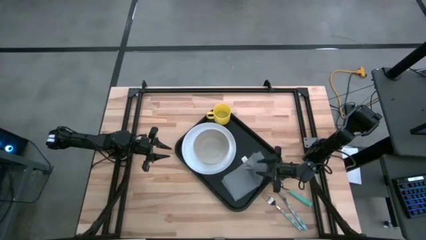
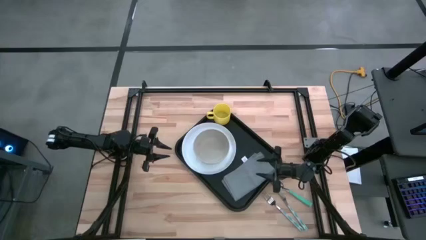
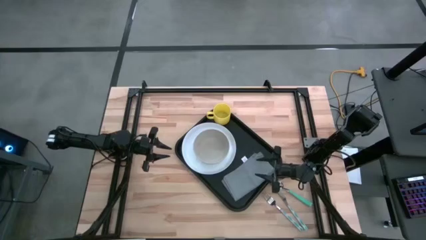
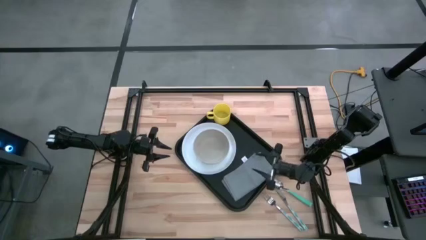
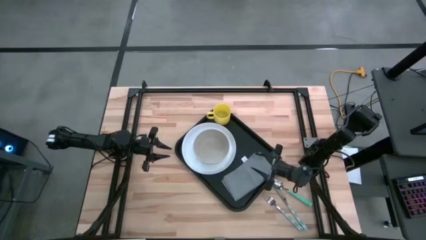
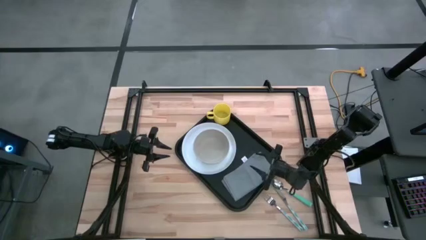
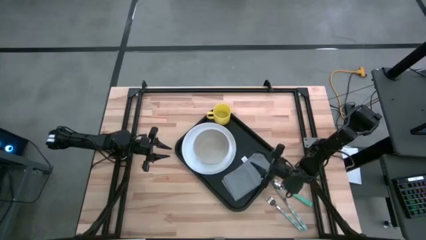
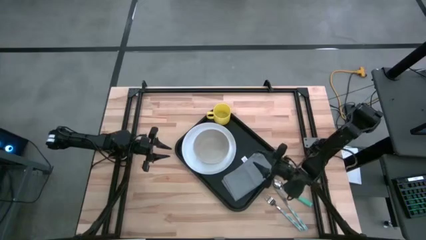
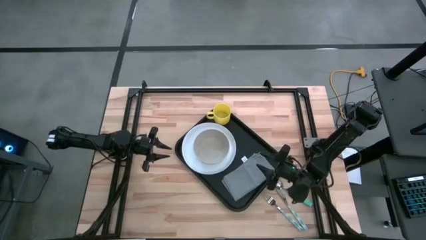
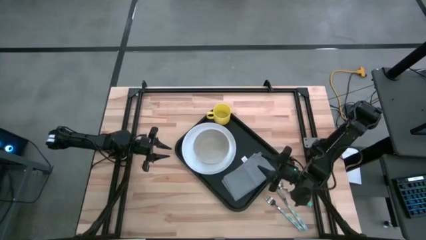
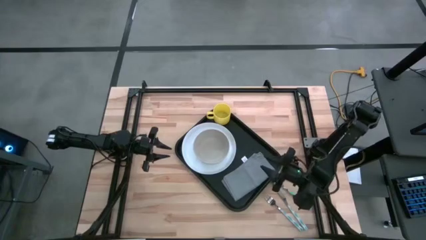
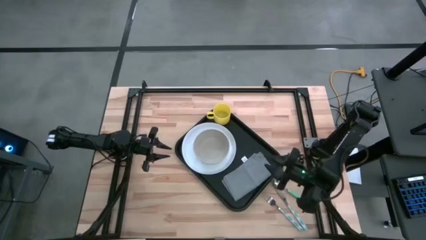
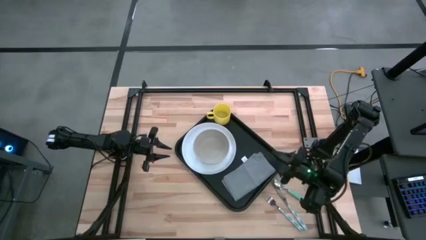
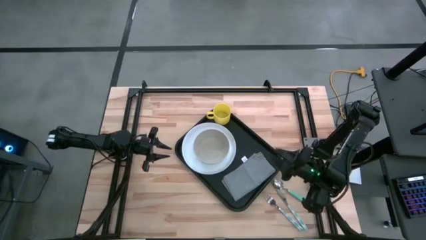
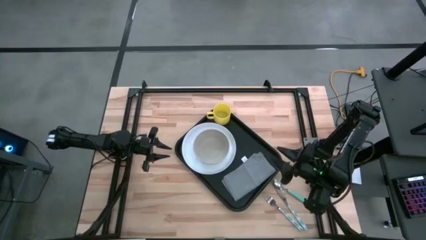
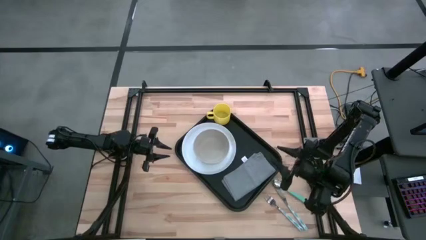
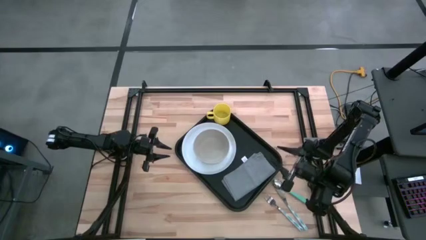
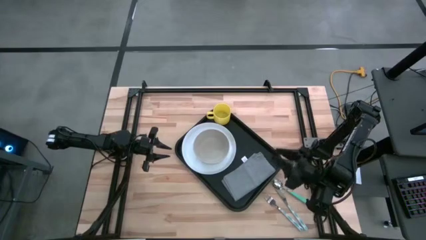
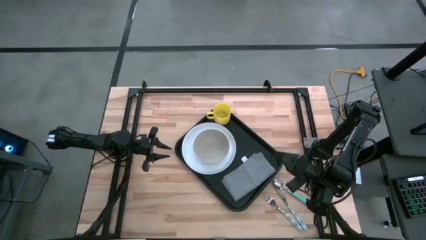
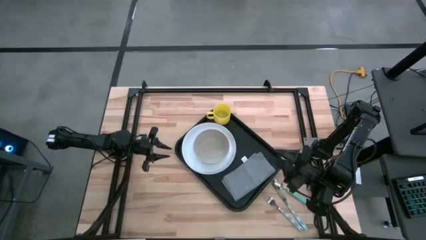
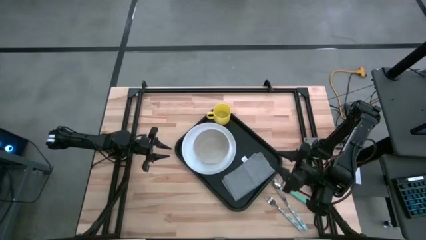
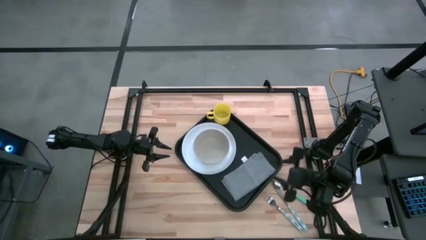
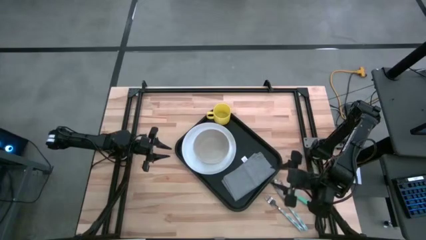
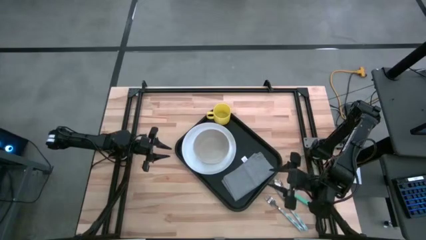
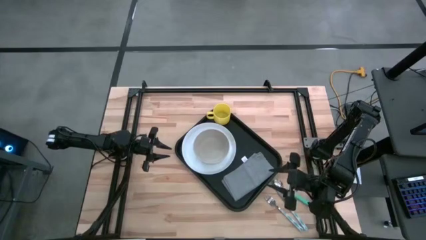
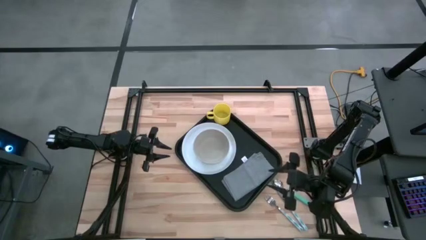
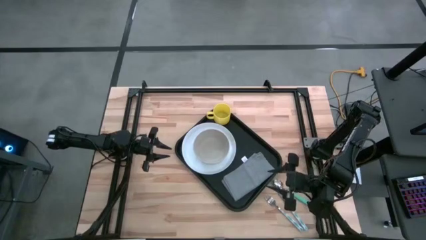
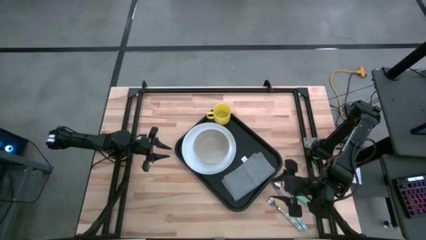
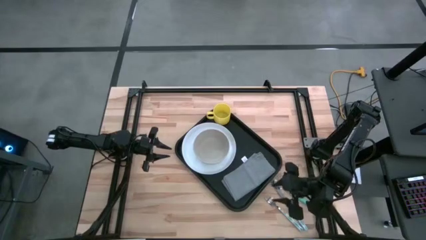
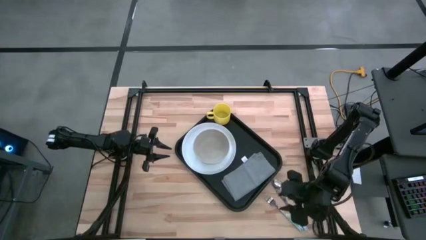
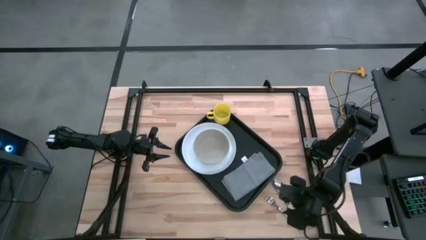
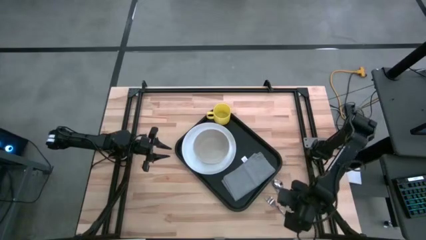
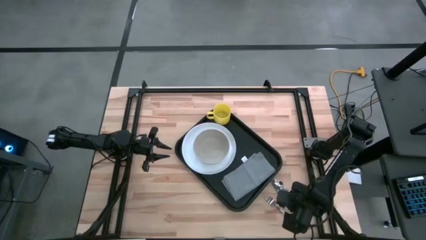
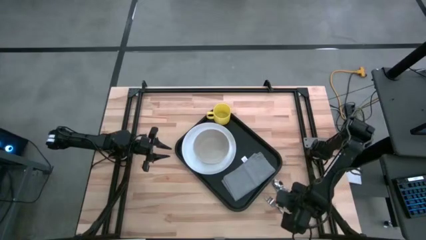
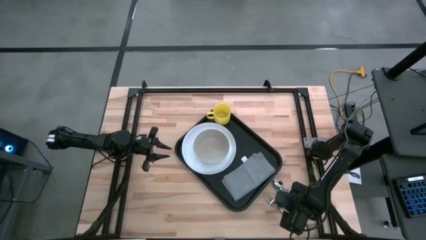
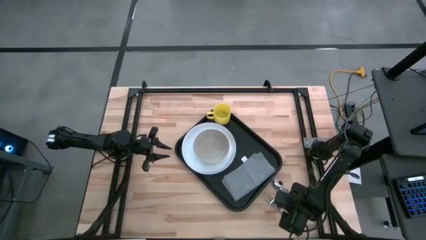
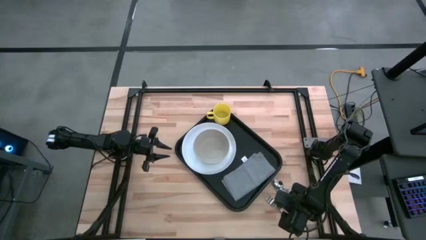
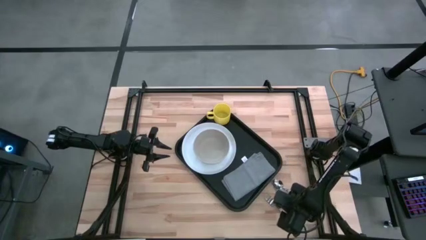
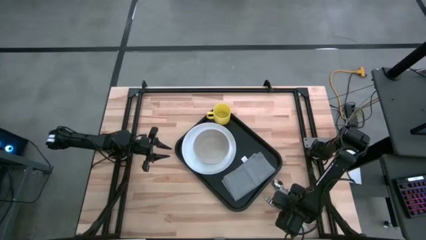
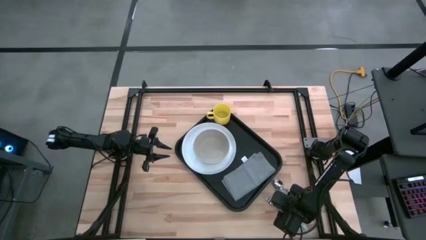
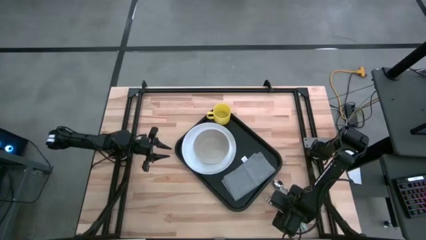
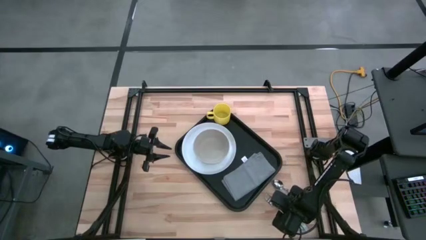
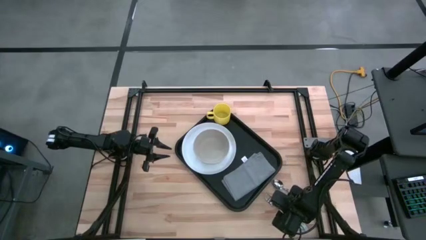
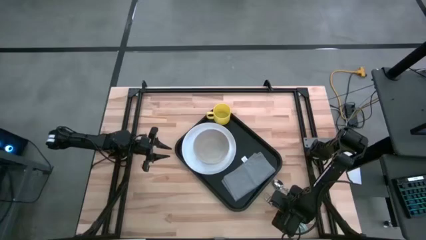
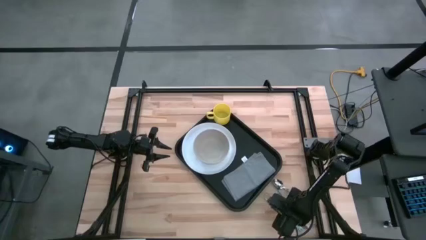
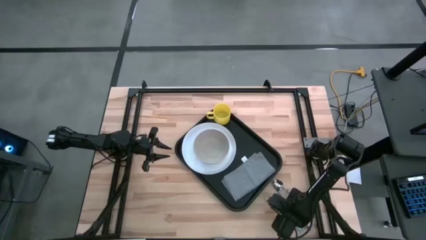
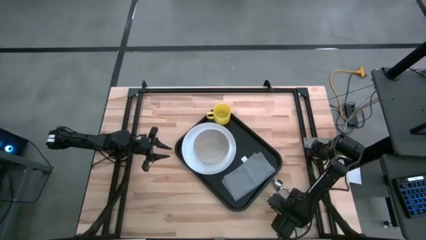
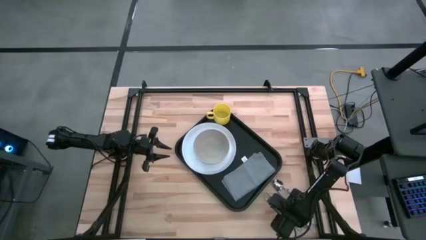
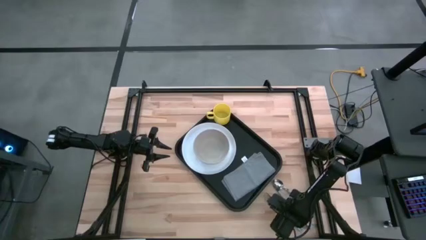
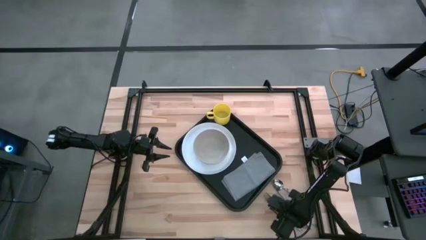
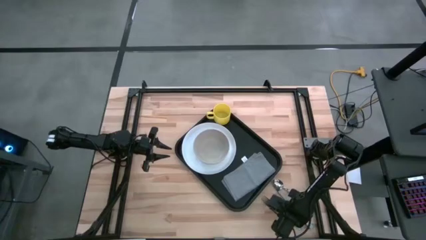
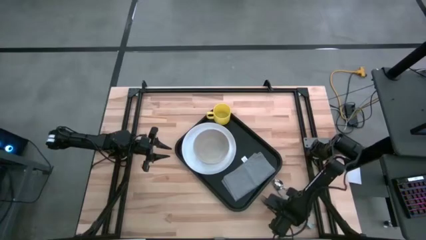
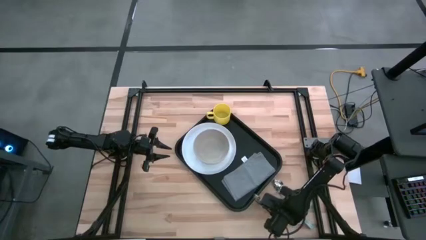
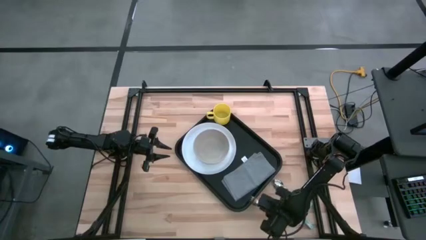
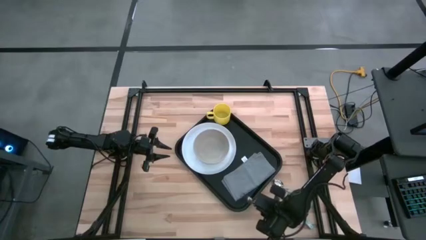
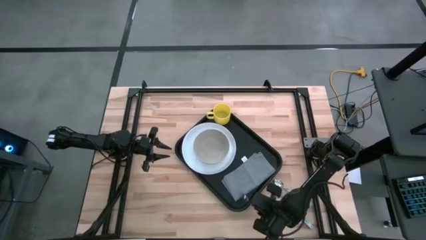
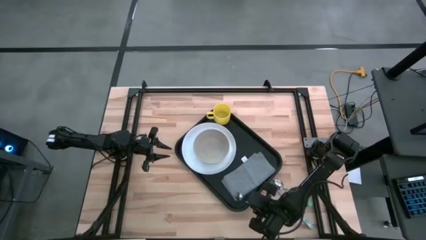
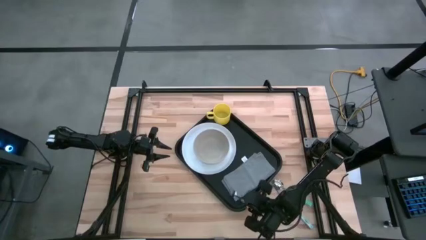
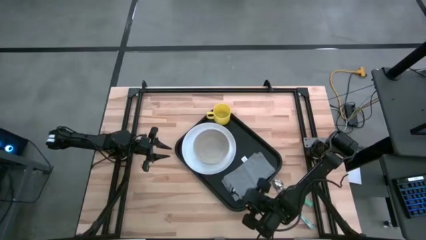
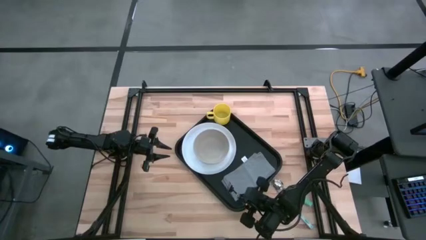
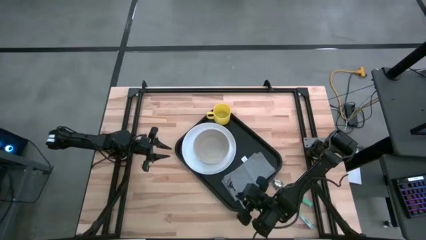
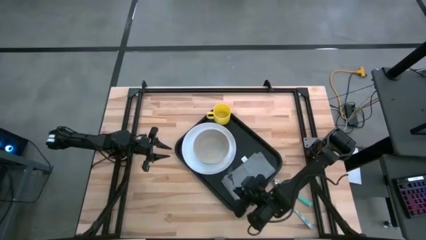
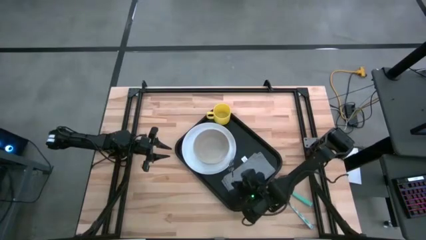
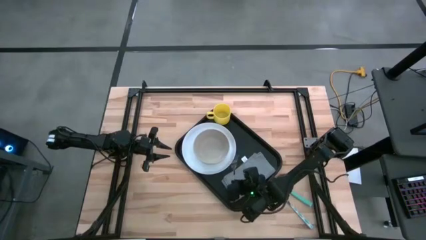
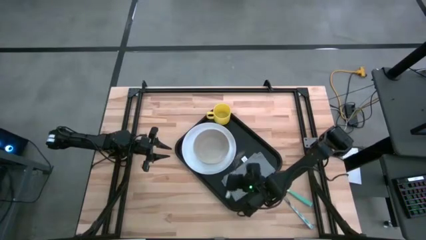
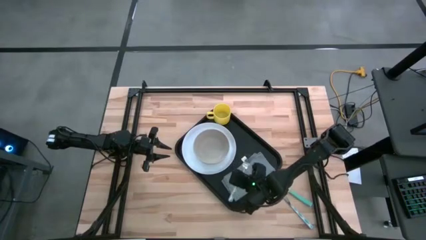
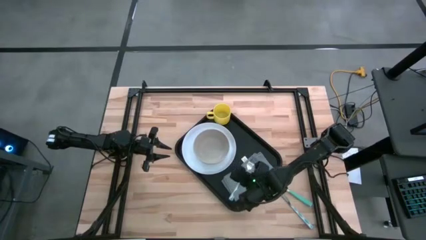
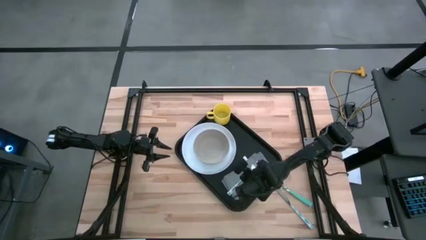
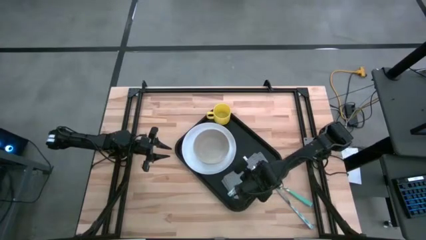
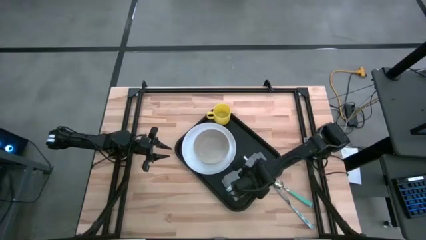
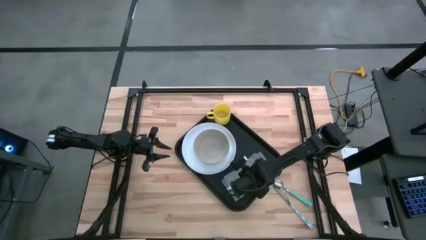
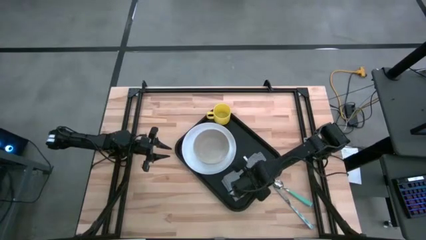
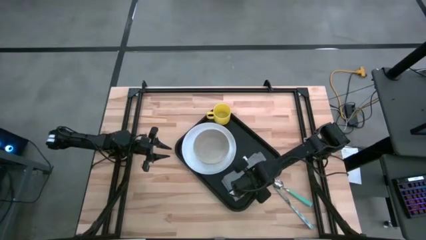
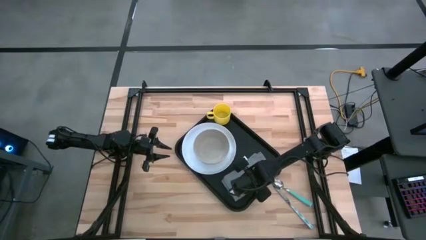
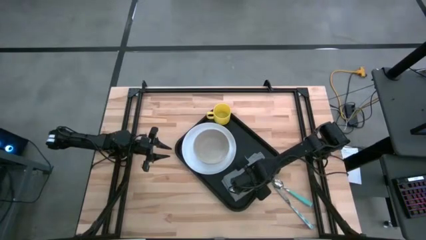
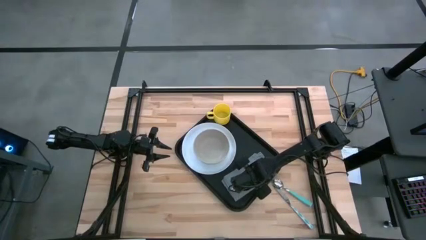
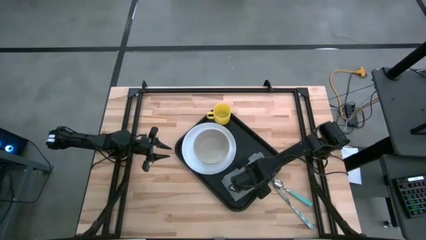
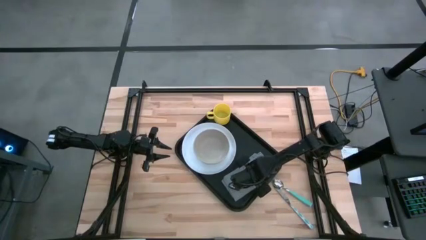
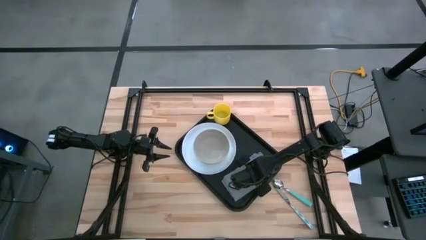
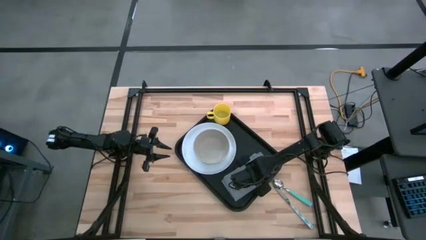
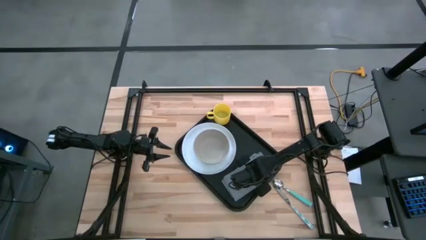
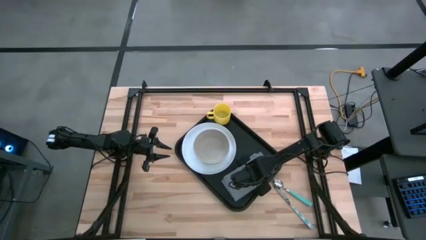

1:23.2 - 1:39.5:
Task: Set up tray
Put the white and blue fork on top of the gray napkin on the black serving tray

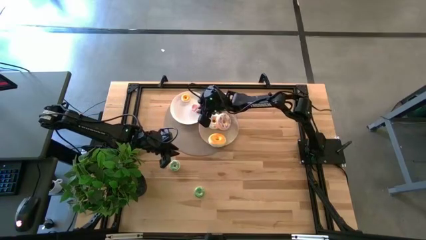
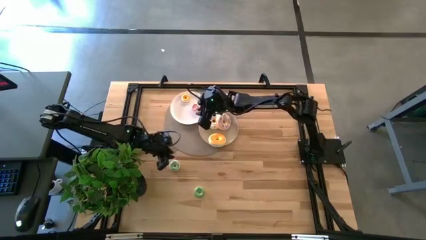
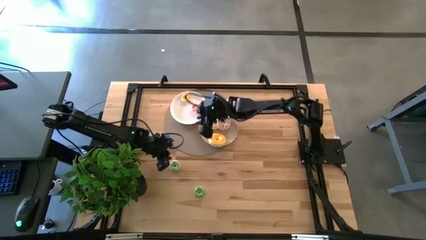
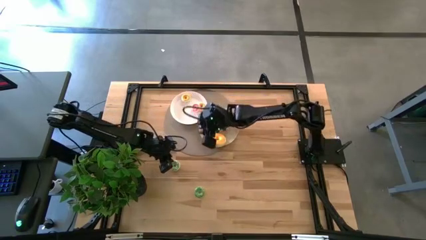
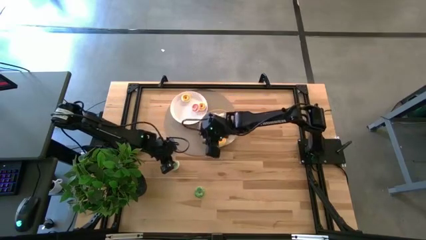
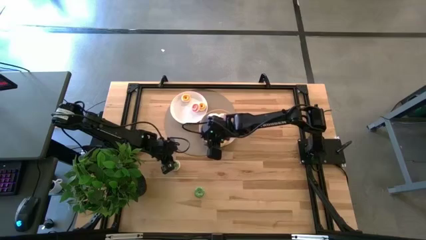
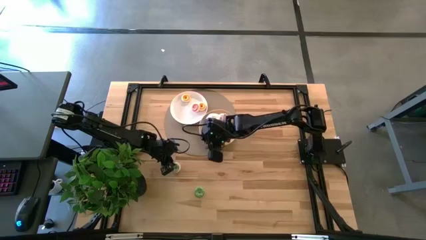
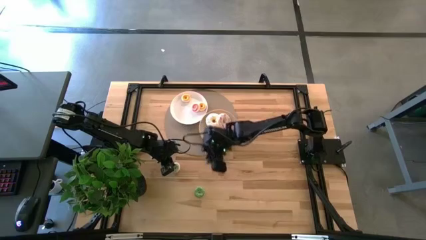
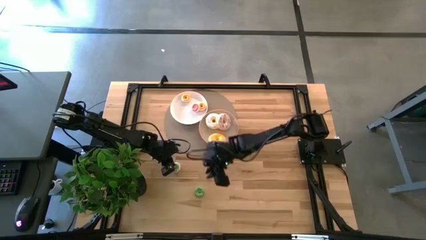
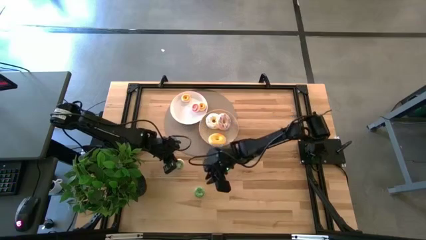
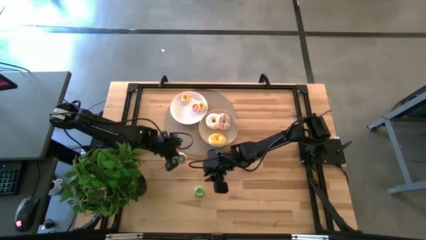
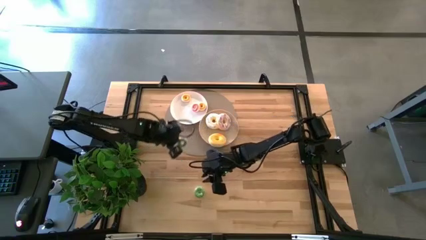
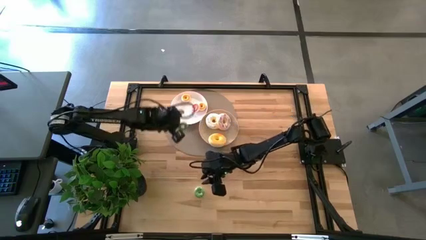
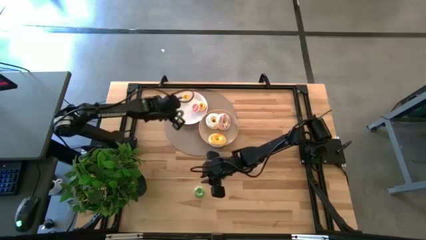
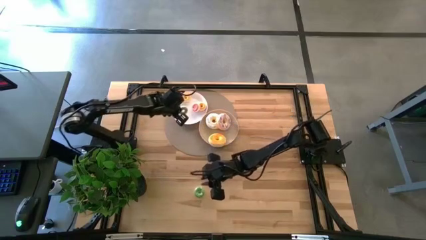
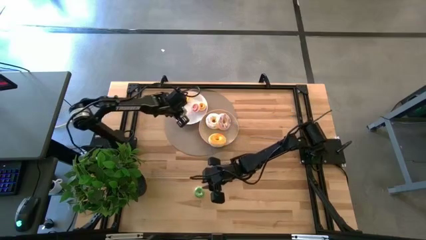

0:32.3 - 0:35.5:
Task: Pick & Place donuts
Put the top small green doughnut on the white plate
